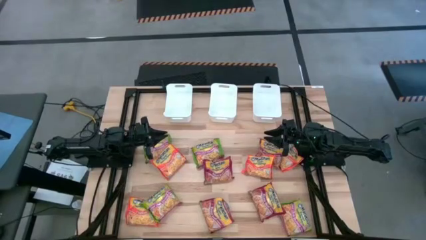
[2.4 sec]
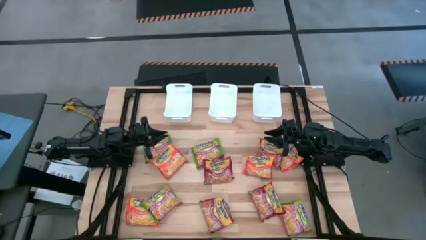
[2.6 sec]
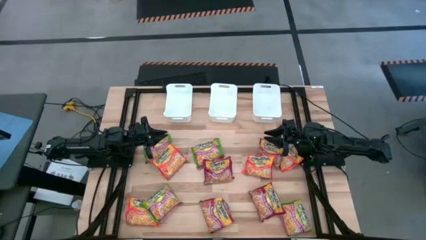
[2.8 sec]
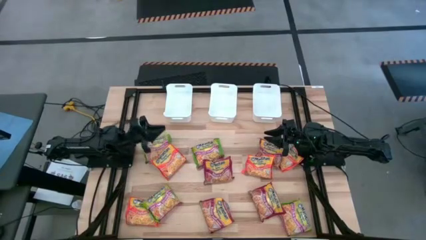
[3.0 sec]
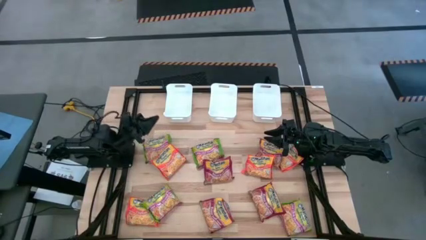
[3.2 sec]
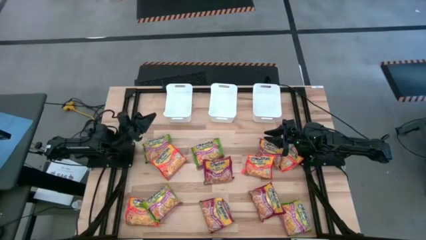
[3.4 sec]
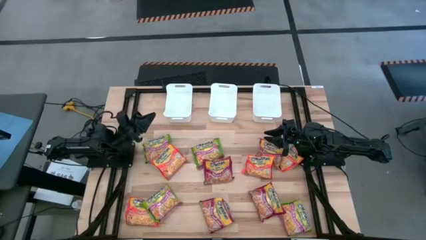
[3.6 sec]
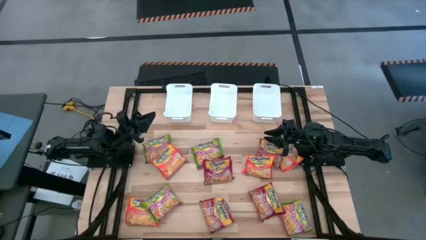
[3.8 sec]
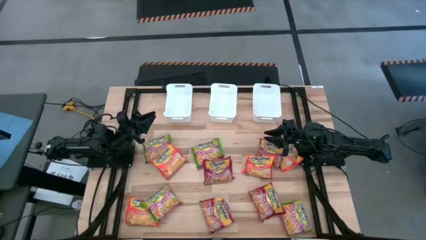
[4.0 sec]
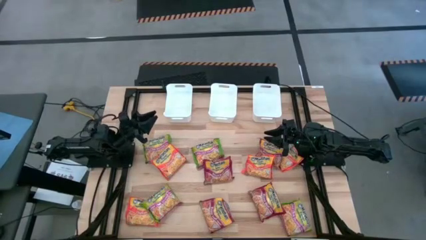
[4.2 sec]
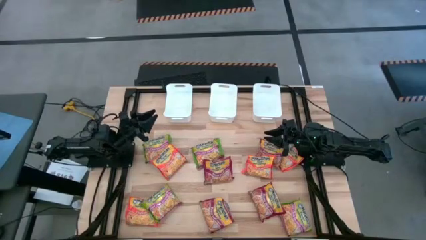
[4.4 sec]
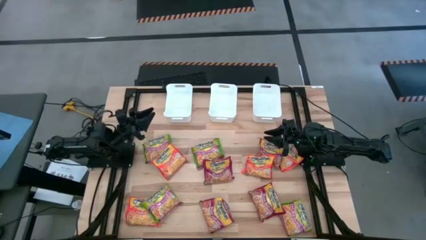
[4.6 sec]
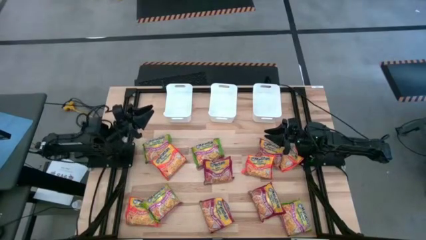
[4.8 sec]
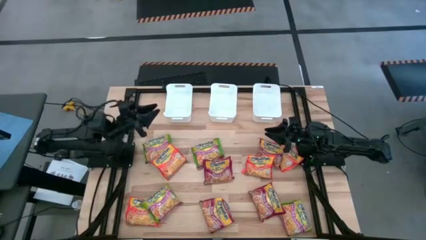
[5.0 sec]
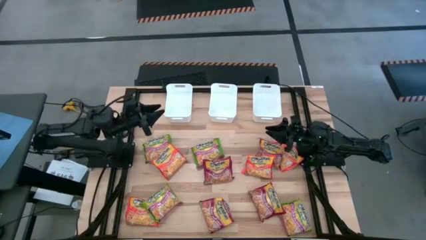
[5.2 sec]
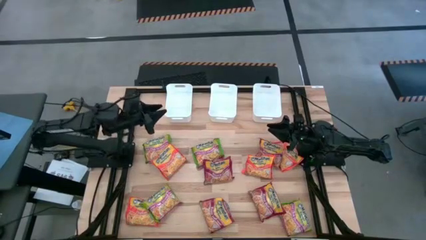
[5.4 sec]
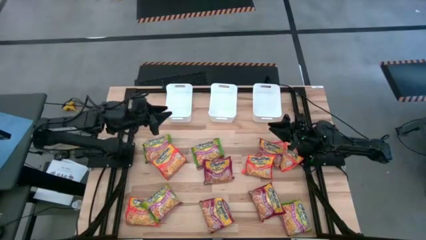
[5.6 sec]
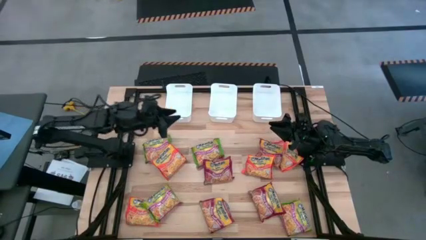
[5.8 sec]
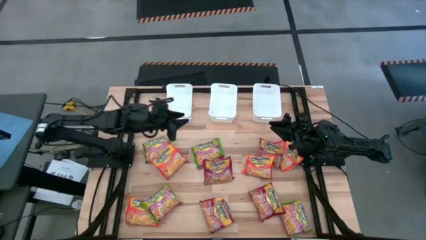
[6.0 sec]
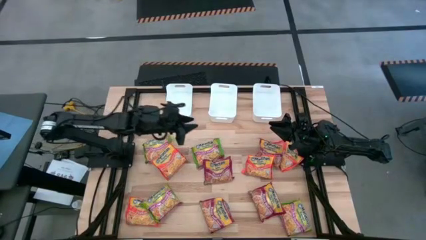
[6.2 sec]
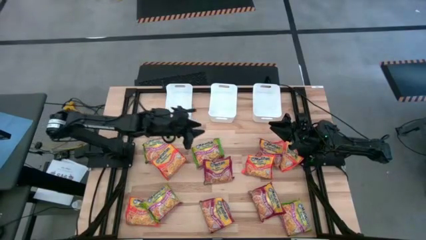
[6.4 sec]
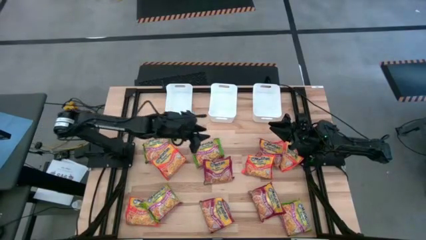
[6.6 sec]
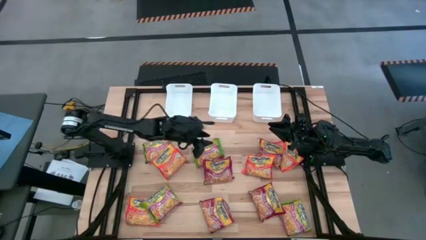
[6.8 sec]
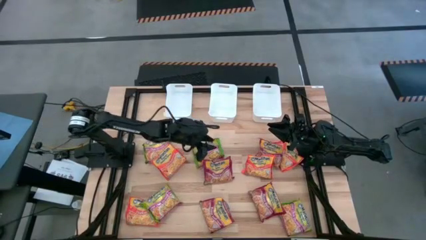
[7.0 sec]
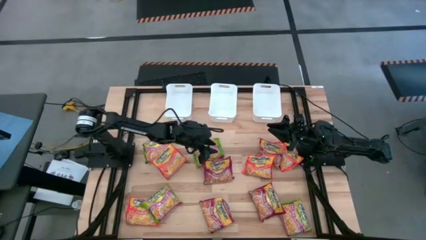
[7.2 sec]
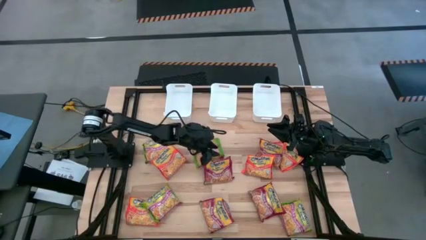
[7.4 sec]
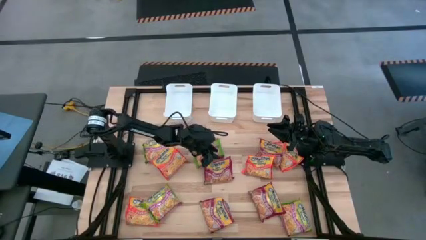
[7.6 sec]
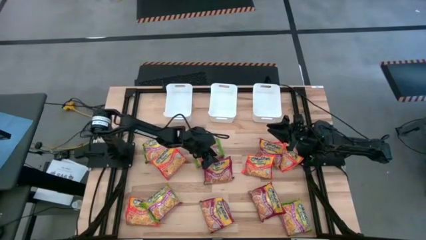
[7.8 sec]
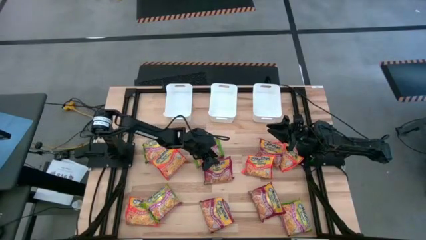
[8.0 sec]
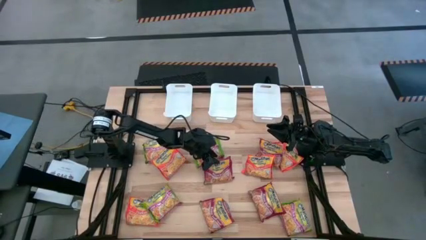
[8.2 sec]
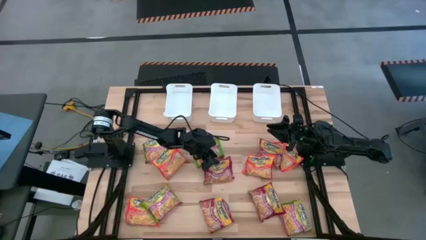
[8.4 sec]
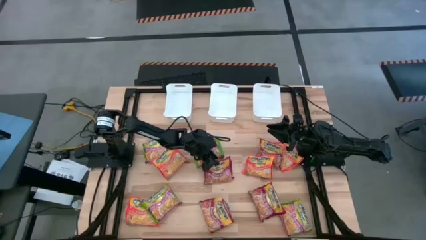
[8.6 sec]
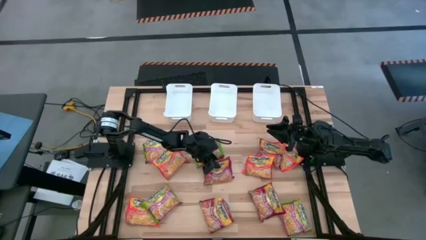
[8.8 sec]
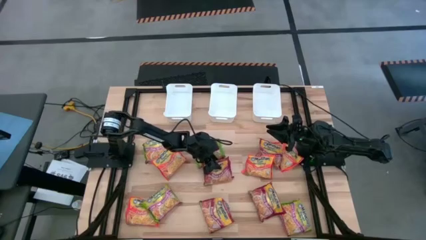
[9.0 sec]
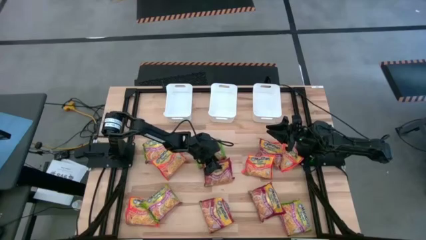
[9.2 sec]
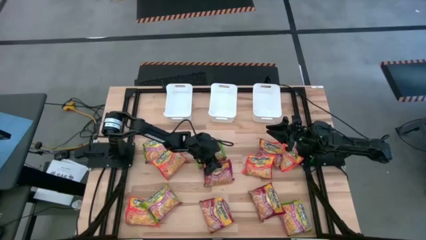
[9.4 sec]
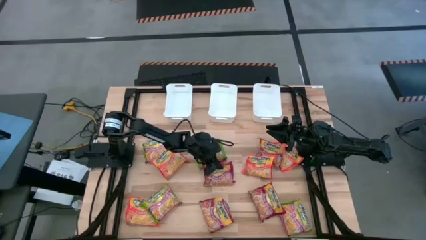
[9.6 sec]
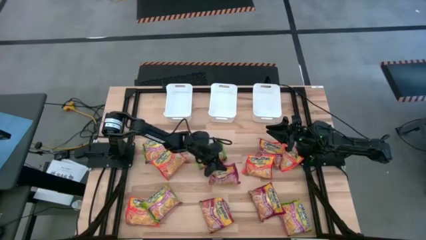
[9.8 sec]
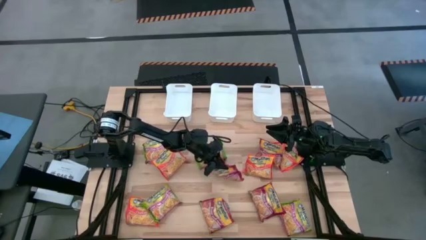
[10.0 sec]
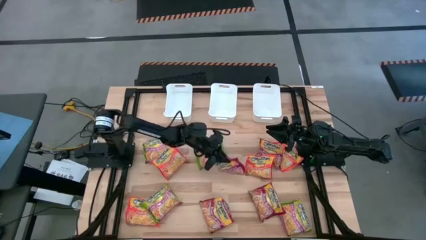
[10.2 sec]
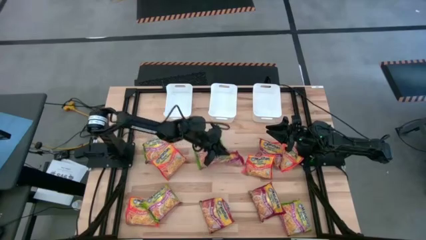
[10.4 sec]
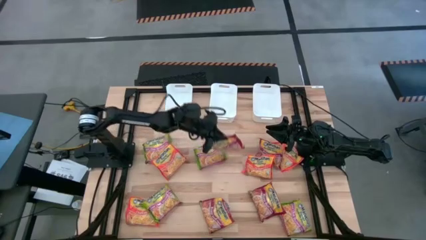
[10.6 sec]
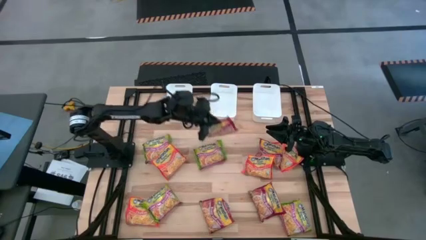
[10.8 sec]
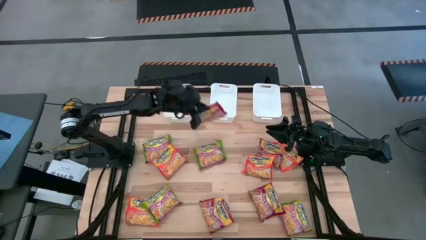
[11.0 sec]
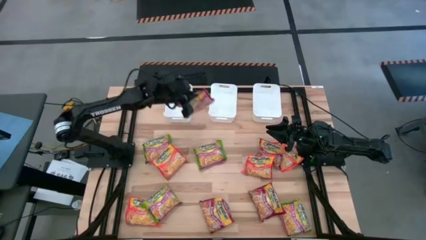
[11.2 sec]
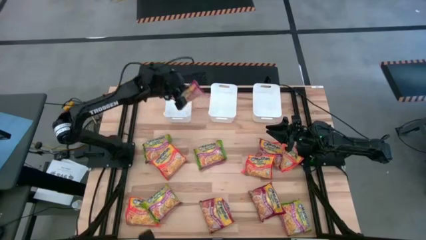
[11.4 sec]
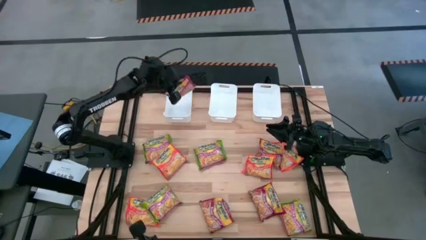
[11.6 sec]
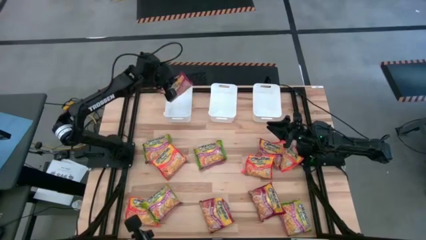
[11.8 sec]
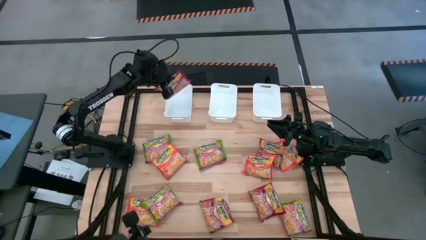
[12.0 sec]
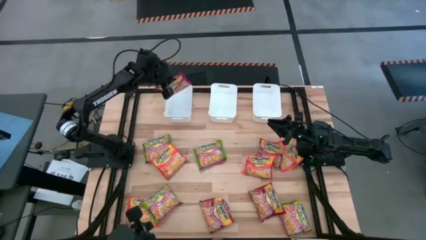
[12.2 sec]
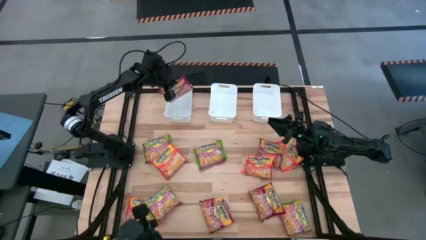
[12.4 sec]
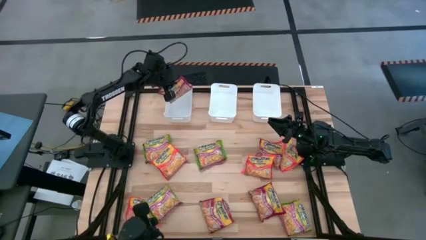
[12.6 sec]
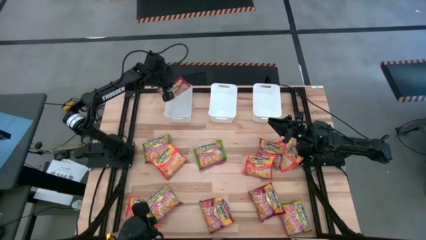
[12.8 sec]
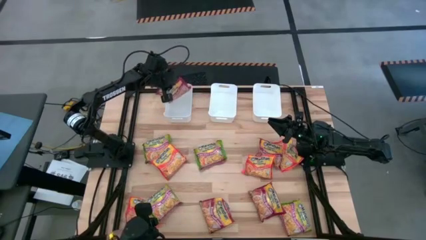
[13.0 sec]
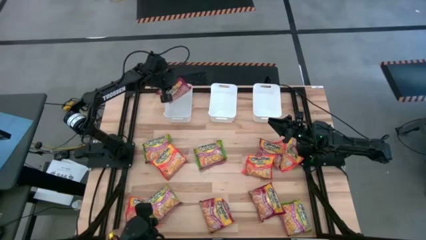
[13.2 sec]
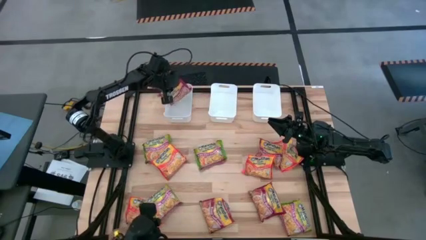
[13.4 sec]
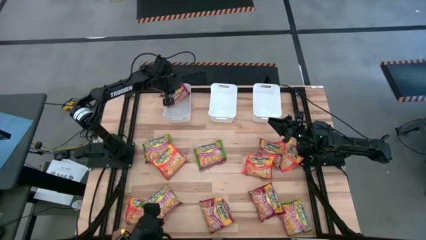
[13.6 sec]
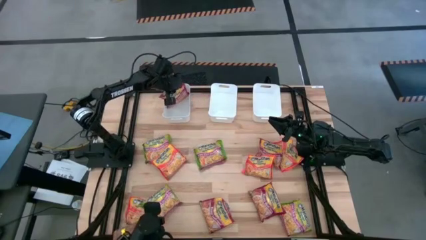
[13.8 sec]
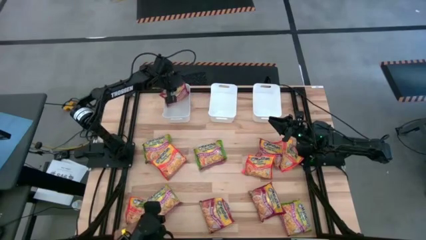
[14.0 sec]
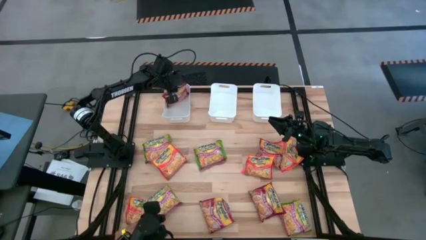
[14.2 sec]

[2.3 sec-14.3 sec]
Task: Sort Maruchan noodles
Put the red noodle pack into the left white bin
